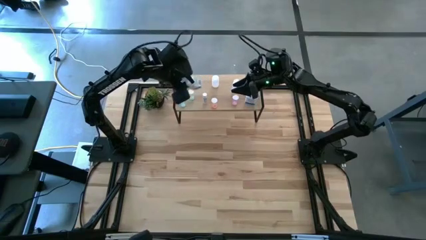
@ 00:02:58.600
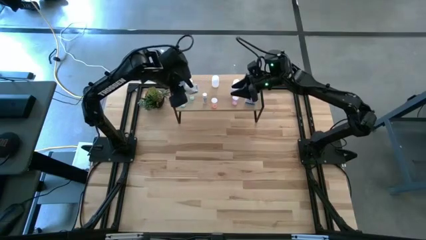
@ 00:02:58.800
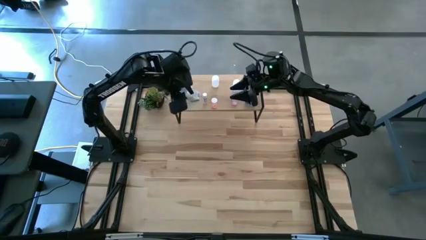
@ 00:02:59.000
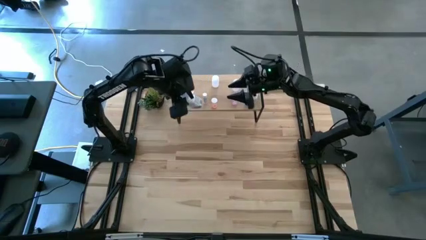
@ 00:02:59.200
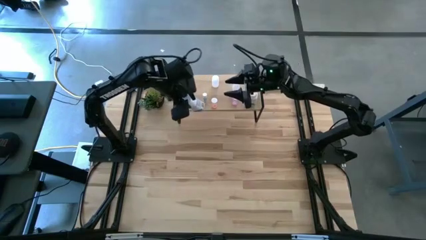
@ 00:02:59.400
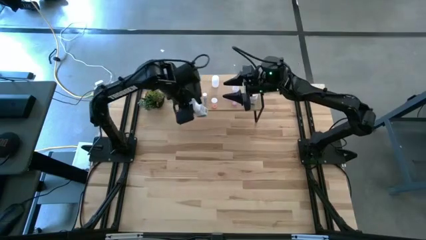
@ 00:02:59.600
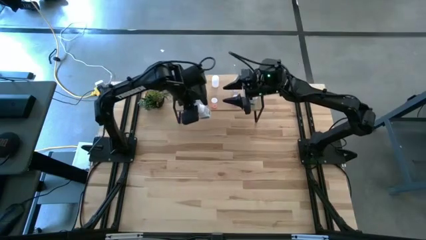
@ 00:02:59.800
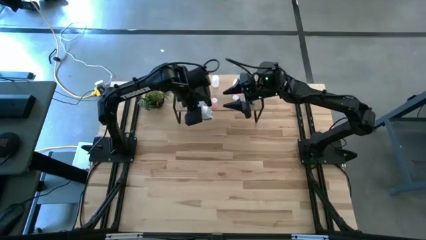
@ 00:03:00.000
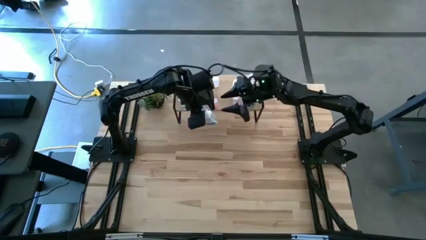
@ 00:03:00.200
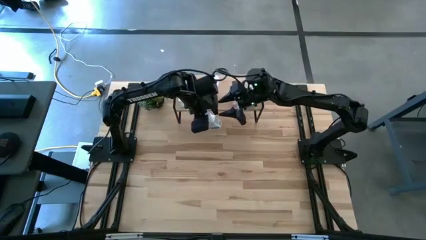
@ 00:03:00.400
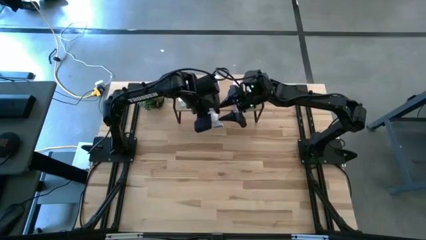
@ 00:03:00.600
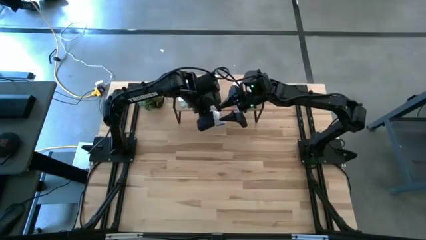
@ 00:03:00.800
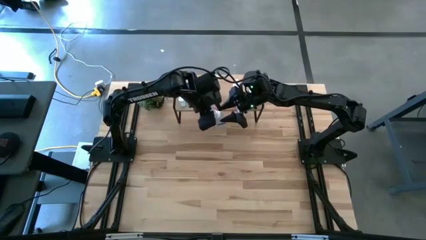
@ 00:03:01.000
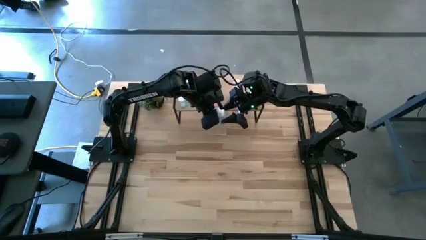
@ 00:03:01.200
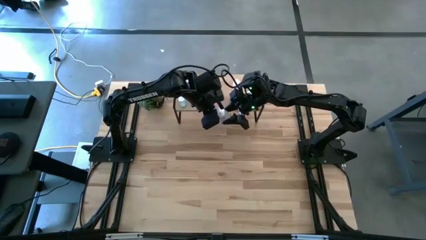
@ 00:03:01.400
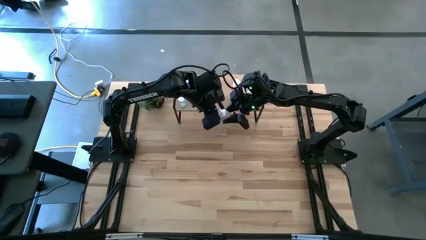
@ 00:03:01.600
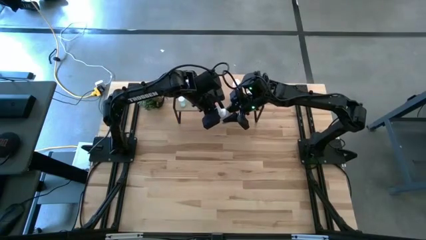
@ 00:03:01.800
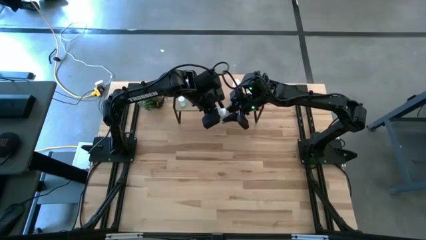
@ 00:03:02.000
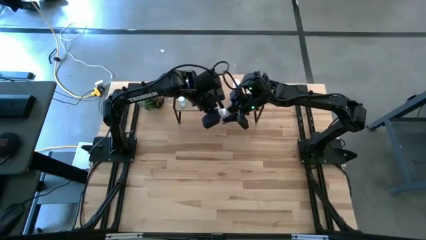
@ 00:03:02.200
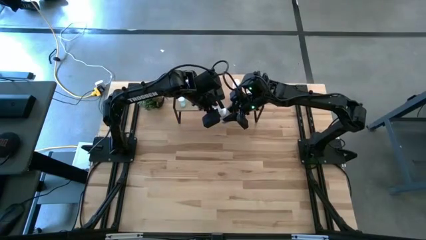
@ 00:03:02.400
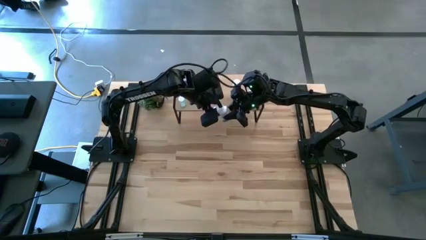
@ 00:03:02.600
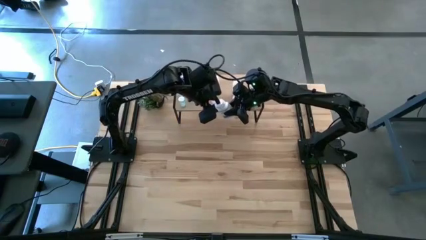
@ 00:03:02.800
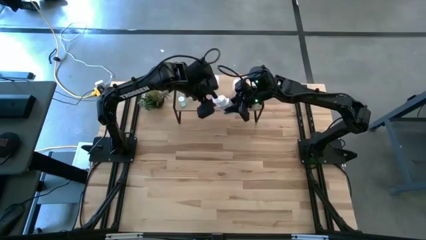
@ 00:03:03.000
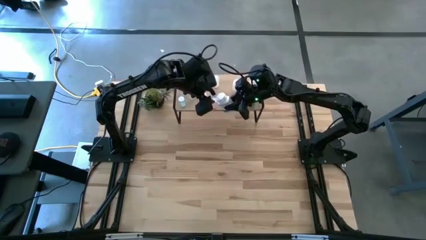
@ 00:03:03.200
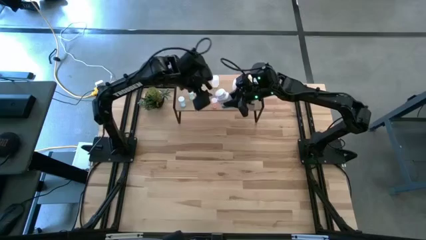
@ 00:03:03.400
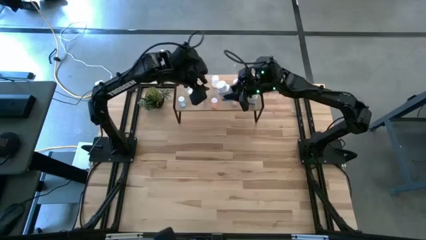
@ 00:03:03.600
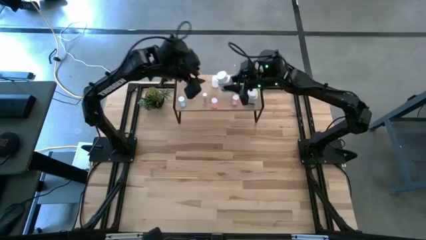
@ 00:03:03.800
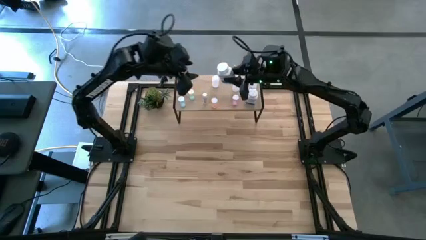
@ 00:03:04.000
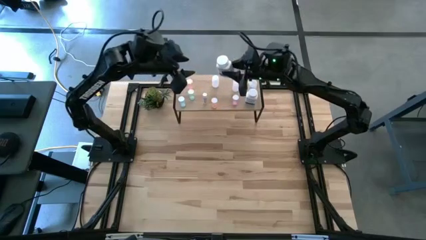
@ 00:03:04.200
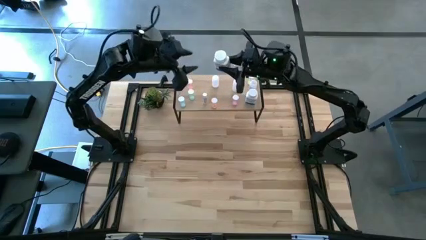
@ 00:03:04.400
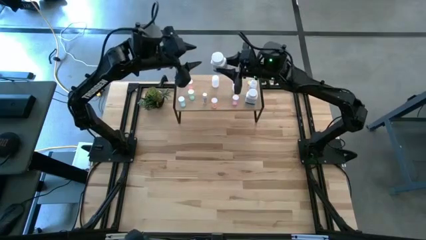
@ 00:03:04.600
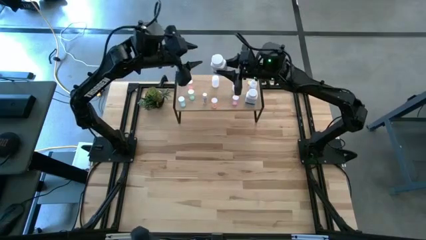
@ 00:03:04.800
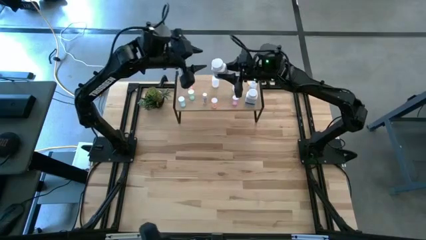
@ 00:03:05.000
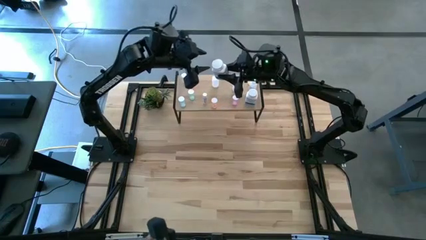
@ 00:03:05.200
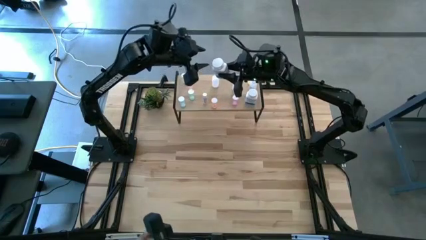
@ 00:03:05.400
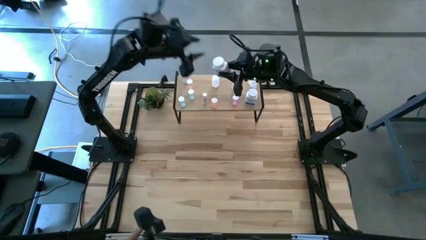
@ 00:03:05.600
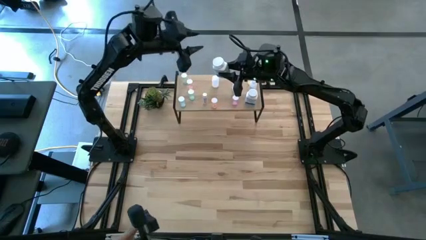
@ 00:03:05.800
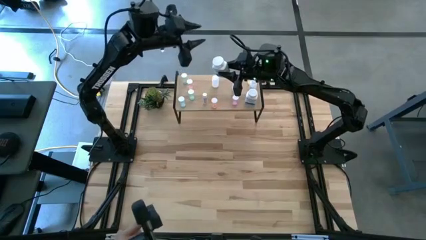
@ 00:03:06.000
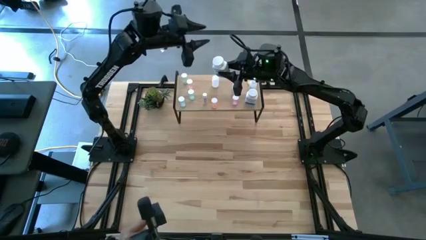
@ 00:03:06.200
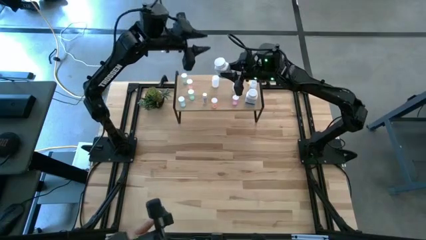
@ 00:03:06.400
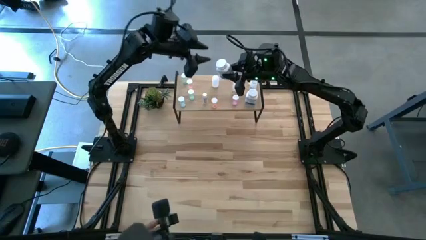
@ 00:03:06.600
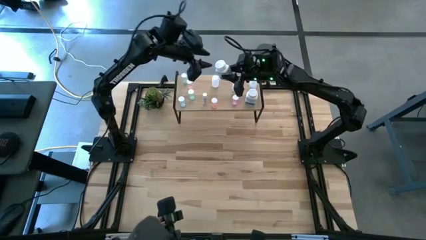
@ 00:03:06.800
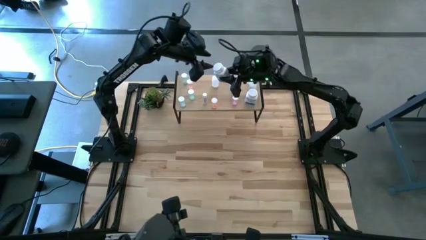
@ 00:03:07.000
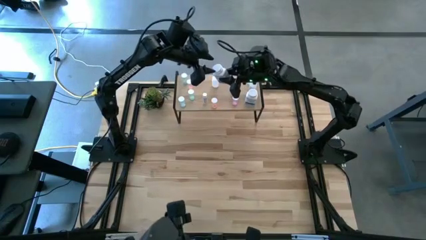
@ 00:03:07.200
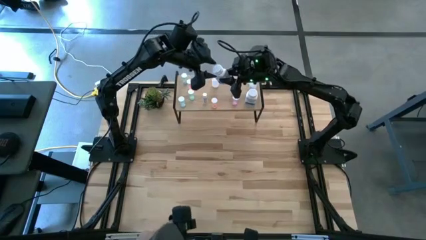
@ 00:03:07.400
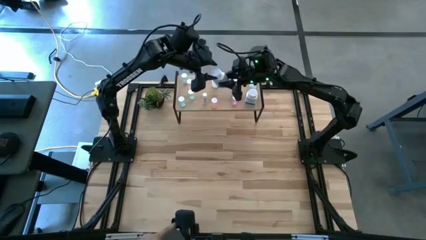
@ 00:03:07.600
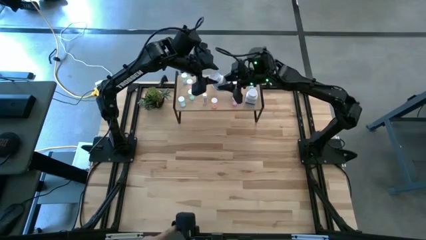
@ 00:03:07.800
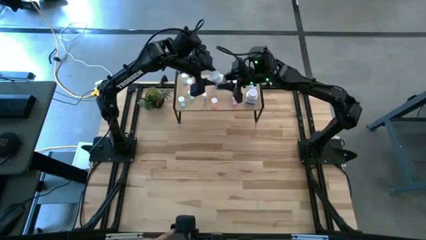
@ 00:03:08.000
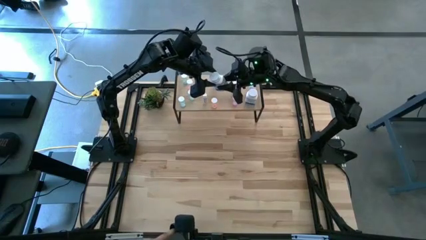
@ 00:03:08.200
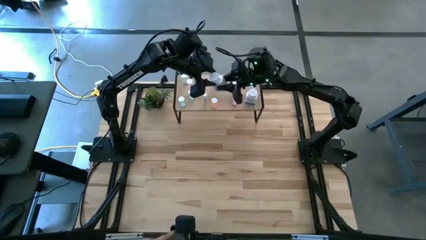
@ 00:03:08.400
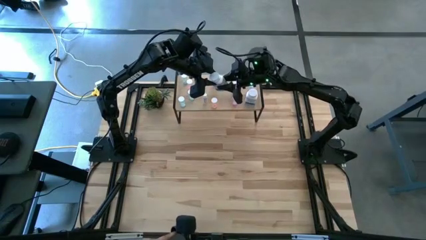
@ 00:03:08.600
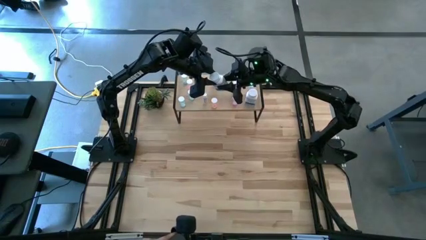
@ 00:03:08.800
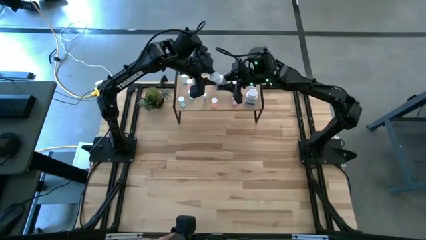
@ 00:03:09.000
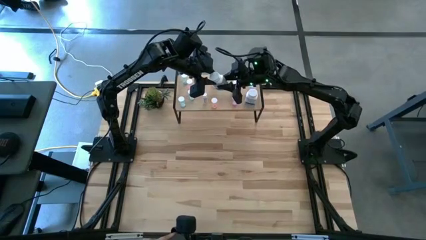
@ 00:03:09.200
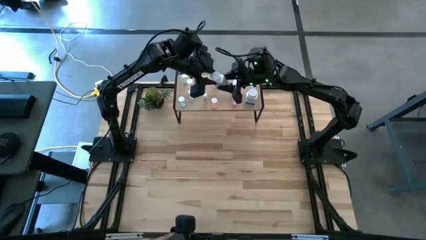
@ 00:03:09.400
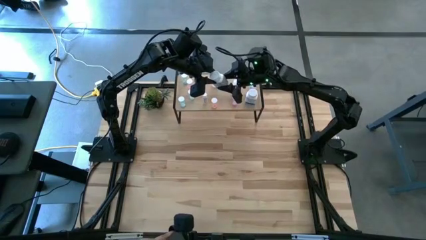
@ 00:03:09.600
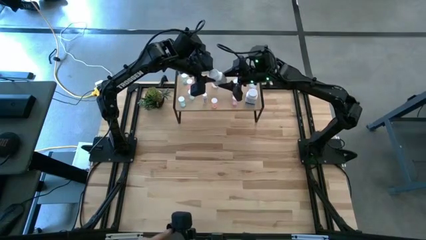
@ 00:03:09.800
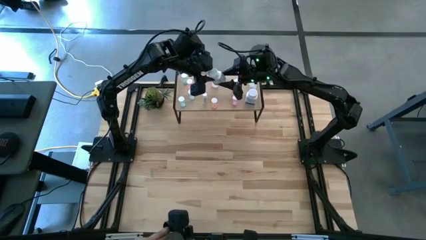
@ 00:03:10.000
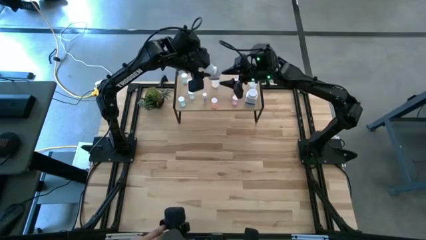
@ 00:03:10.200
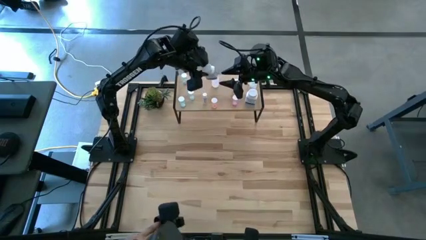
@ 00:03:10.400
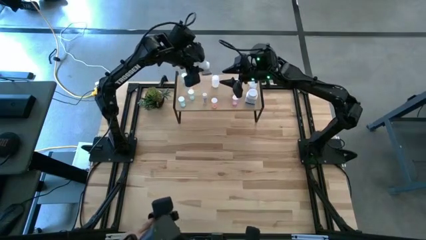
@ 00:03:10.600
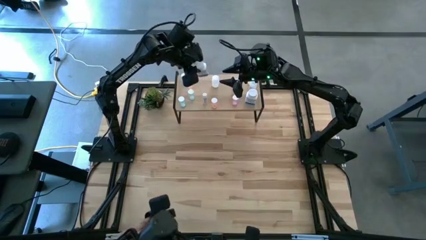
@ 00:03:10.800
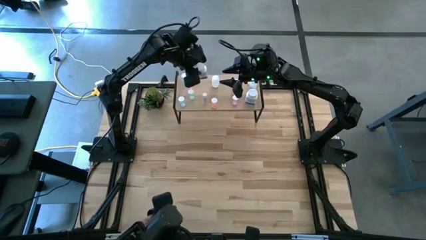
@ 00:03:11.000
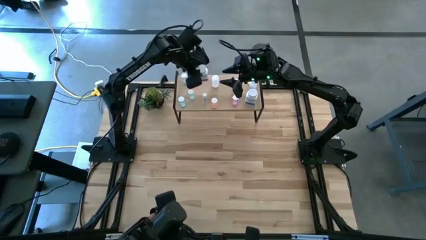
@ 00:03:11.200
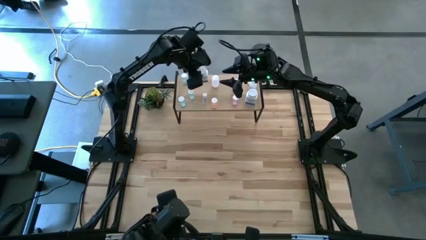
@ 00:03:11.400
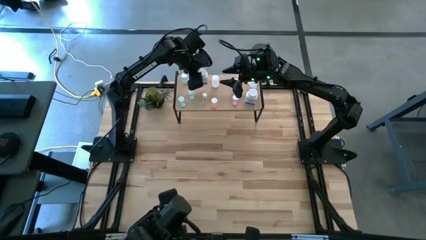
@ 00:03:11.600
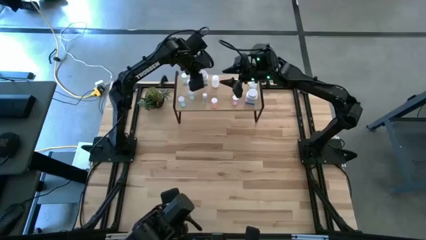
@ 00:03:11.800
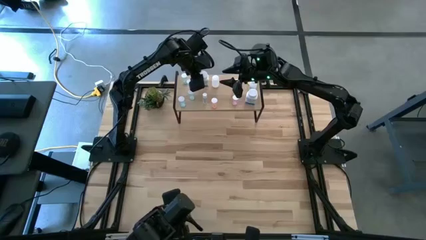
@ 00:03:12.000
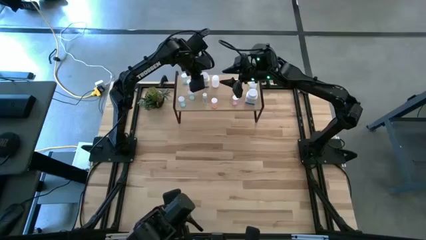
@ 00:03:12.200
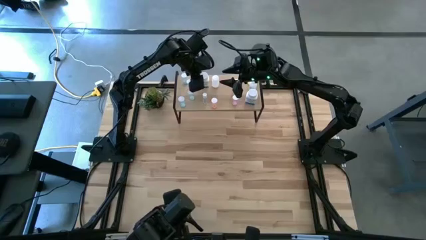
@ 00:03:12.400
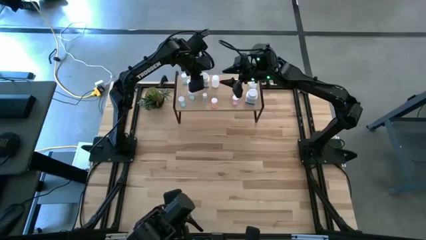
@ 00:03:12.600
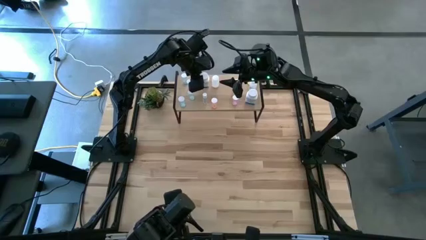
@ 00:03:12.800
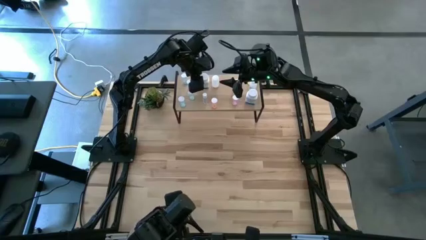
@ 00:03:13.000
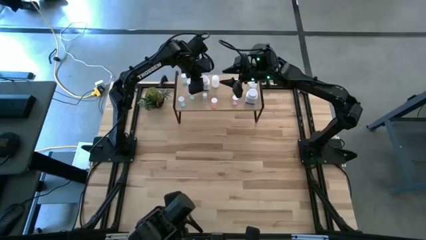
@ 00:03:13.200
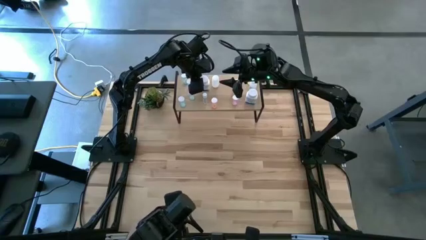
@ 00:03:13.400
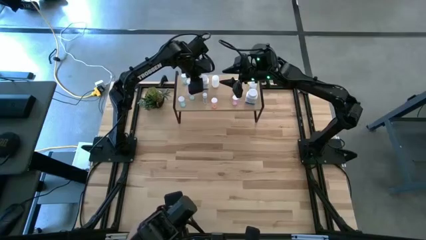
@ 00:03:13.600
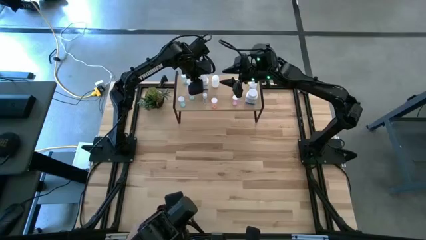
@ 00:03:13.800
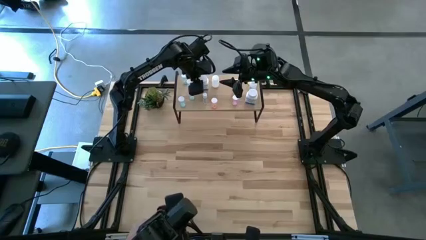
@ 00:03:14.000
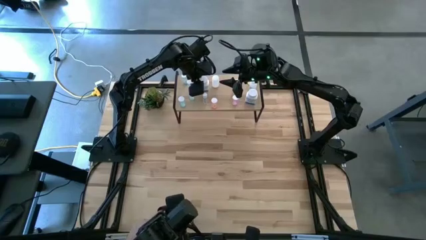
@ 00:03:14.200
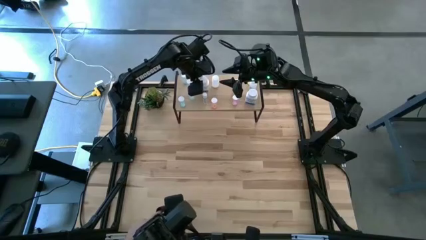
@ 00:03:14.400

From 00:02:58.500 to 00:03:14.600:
Task: Pick and place medicine bottles onto shelf by color
Put the white blue pill bottle on the shelf
